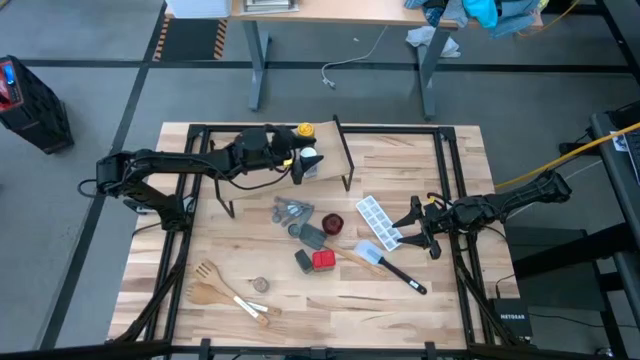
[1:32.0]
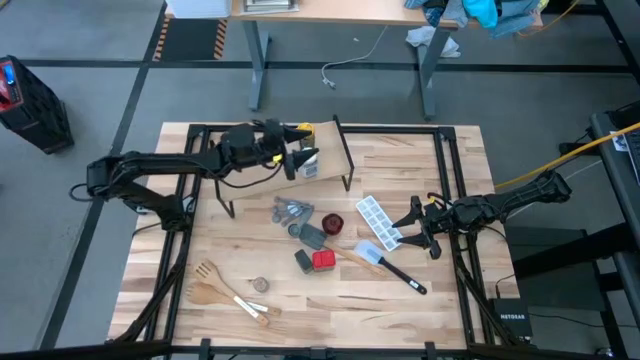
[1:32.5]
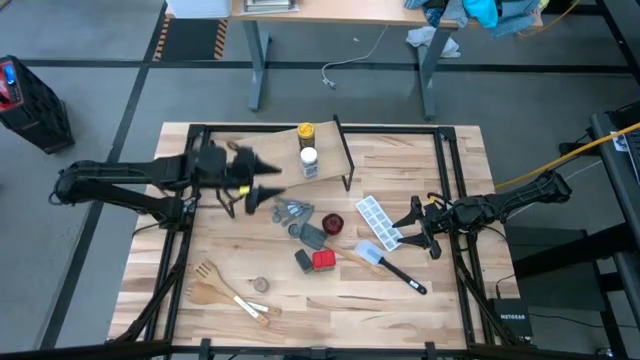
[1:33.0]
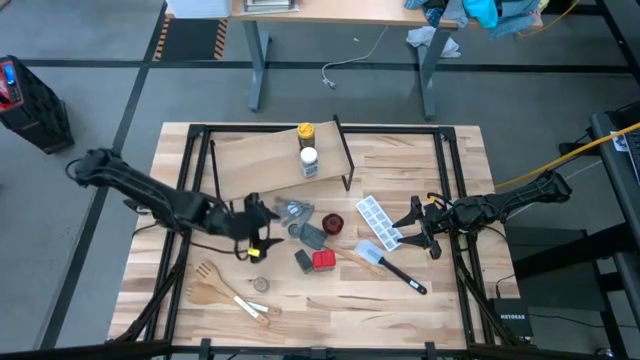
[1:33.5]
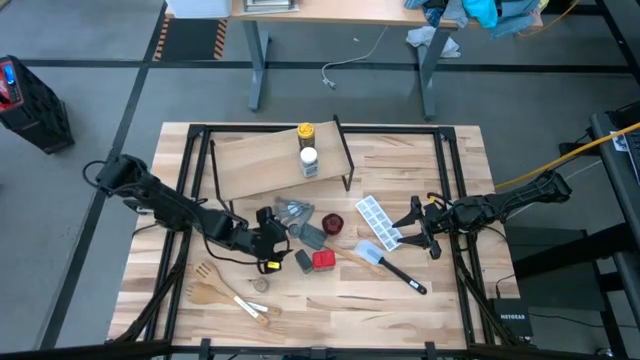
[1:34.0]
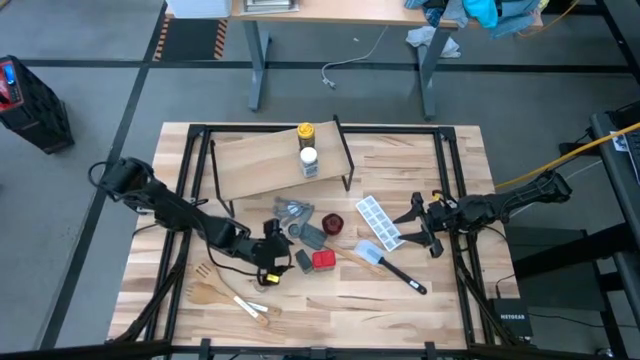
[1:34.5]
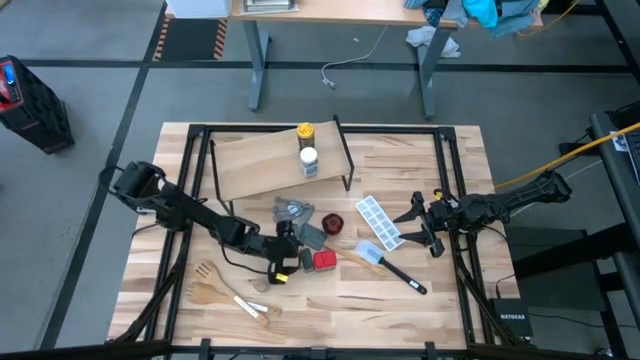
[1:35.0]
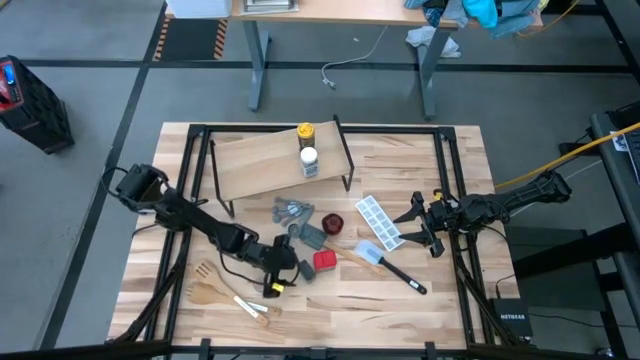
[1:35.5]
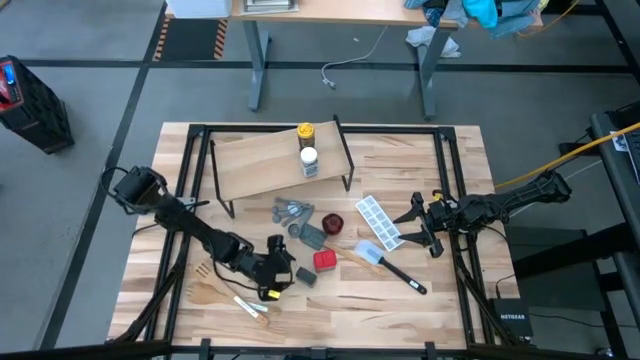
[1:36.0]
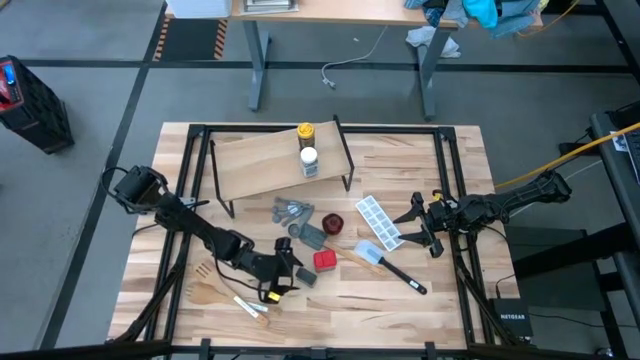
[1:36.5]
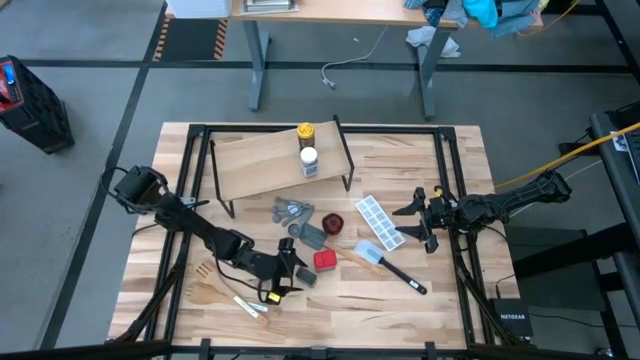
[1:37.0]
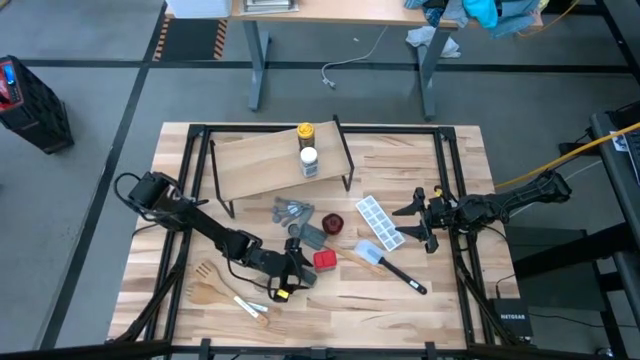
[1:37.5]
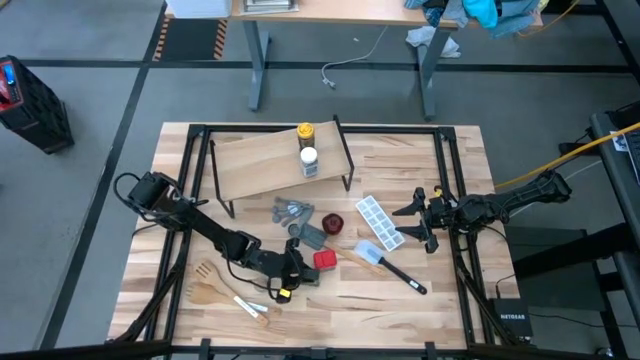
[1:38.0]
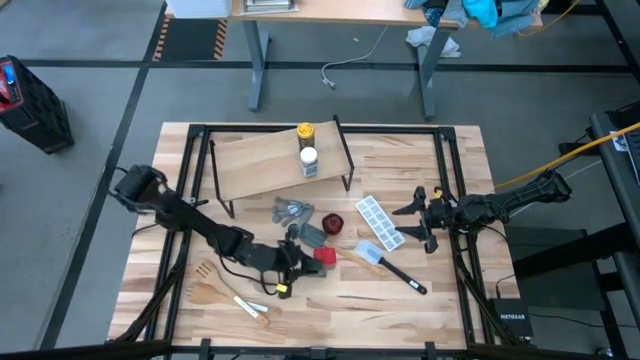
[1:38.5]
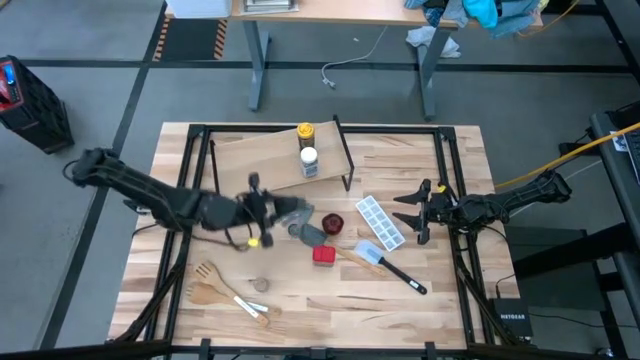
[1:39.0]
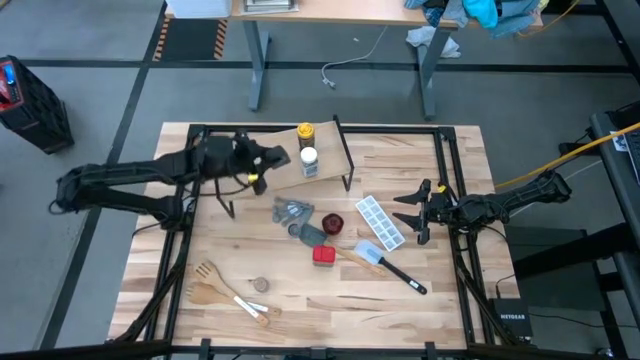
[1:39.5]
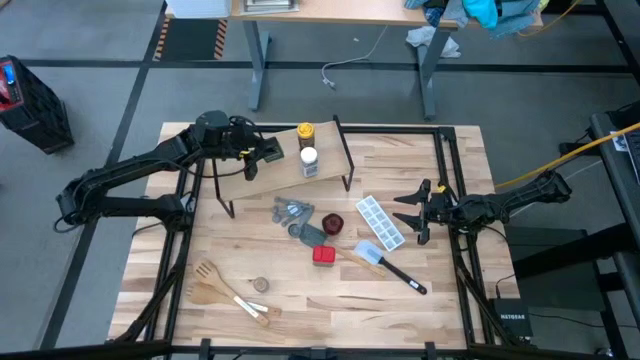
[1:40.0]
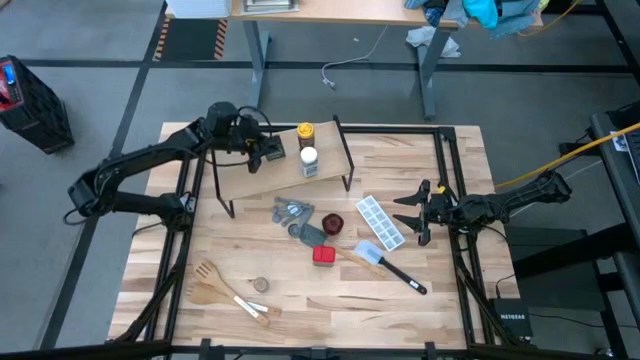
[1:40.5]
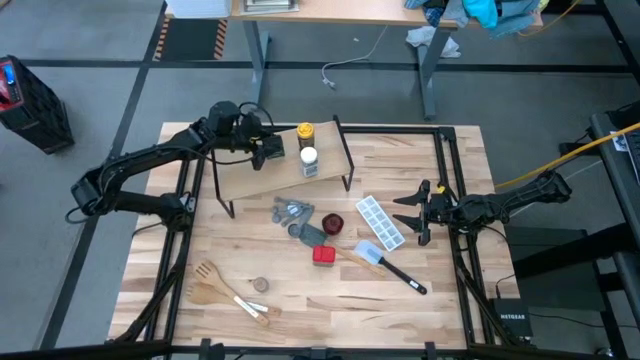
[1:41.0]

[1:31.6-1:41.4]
Task: Shelf spices
Put the green seasoning can on the shelf

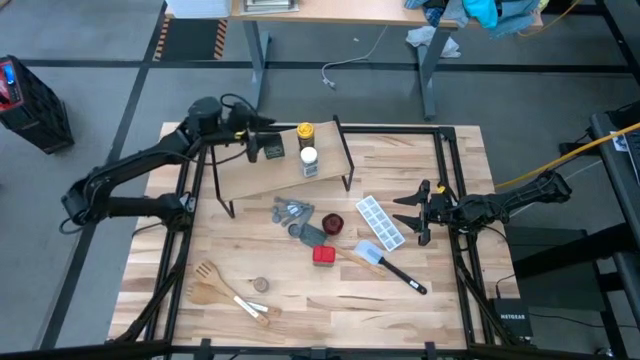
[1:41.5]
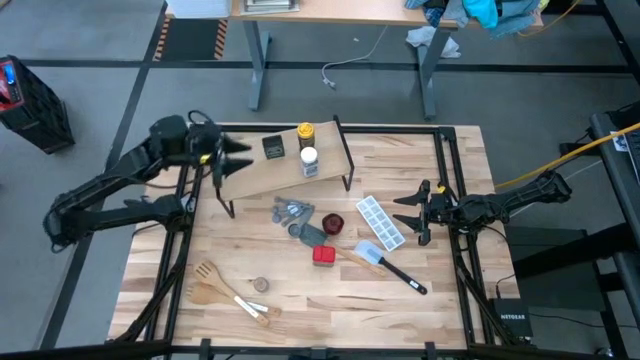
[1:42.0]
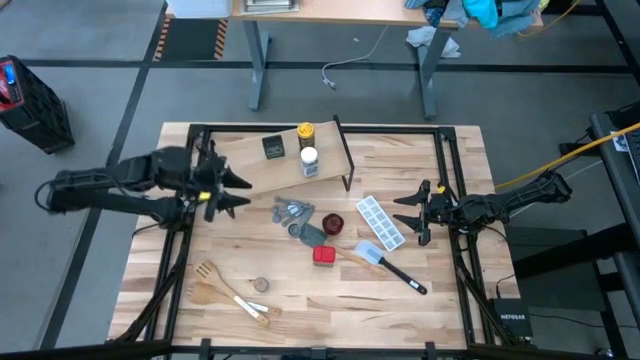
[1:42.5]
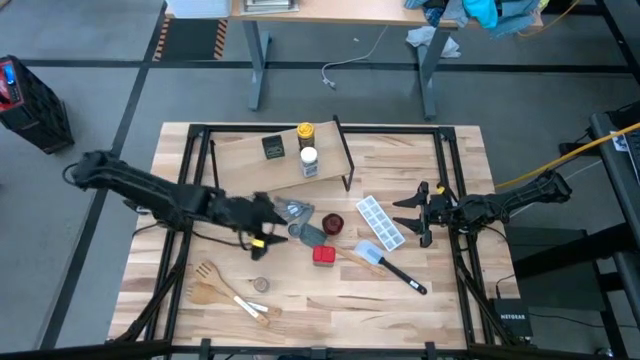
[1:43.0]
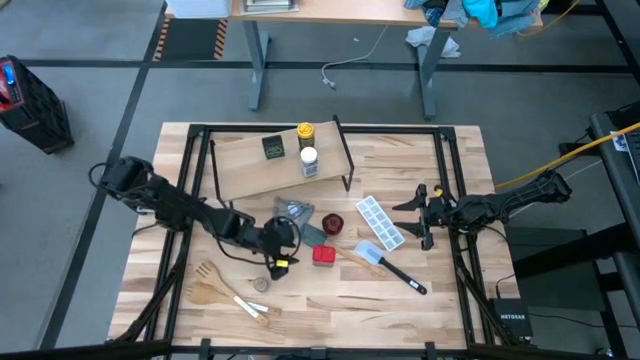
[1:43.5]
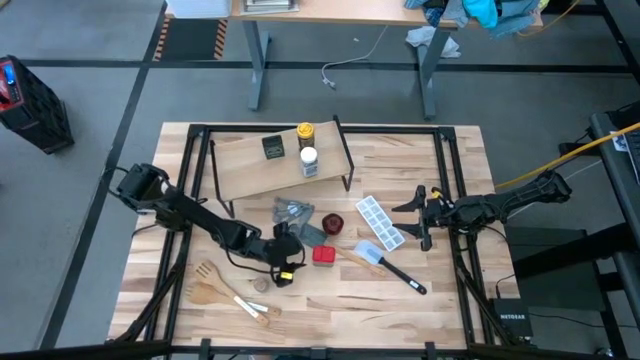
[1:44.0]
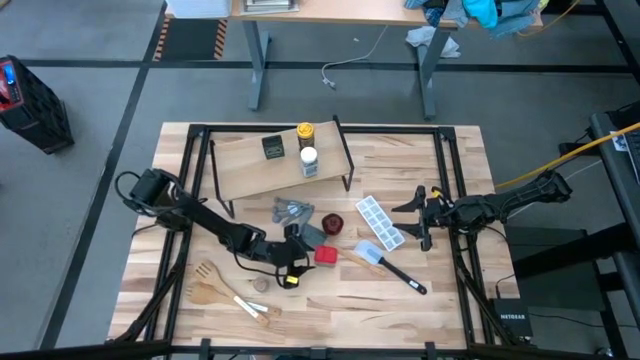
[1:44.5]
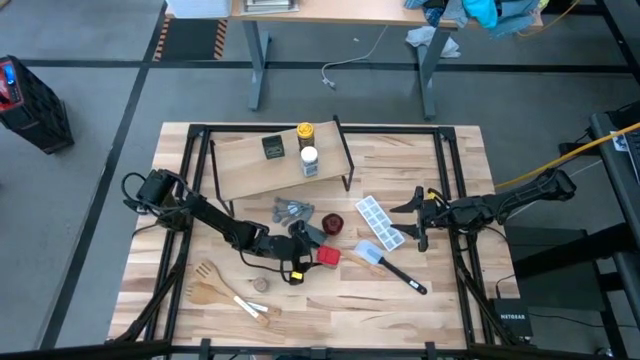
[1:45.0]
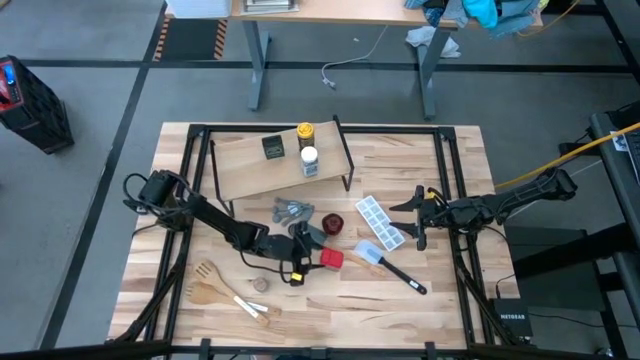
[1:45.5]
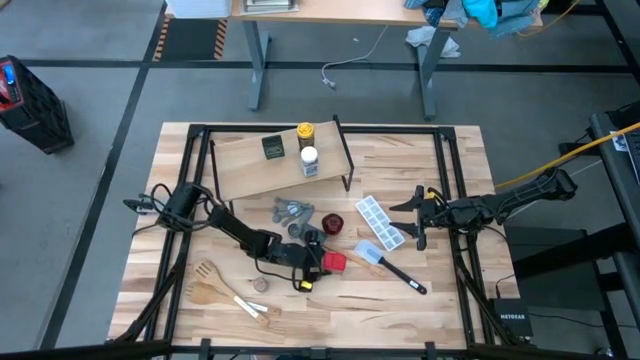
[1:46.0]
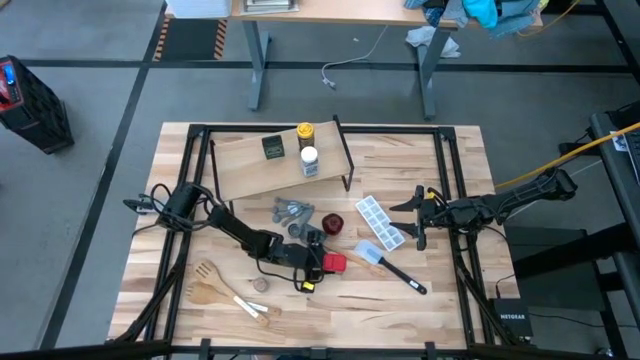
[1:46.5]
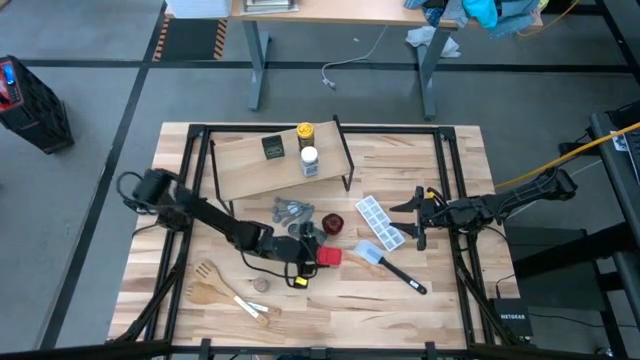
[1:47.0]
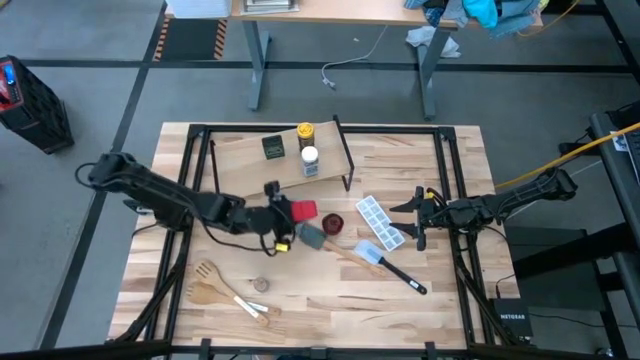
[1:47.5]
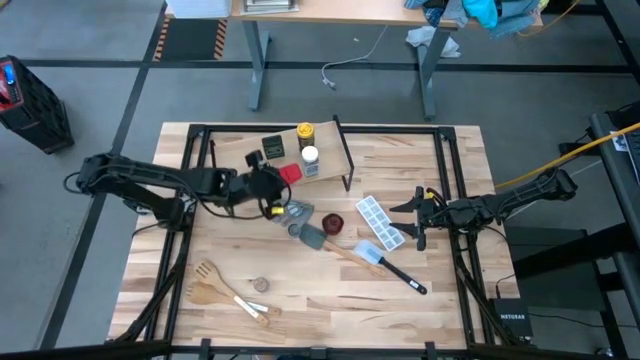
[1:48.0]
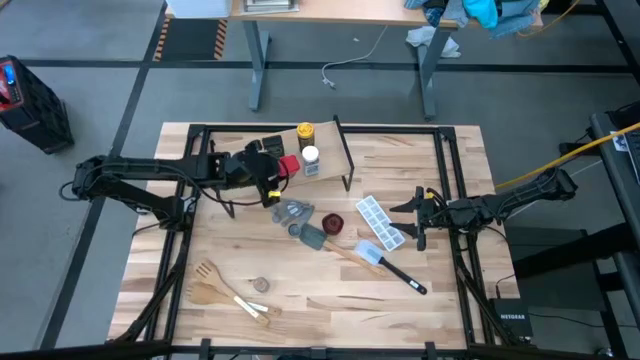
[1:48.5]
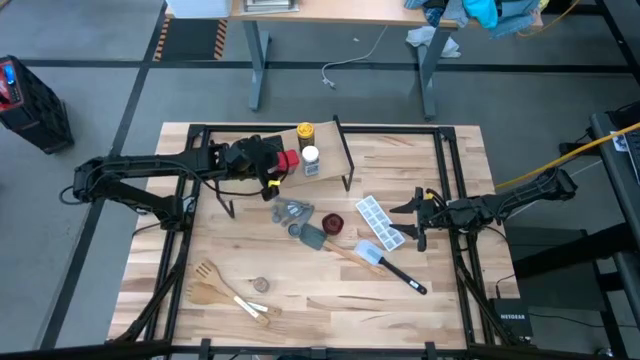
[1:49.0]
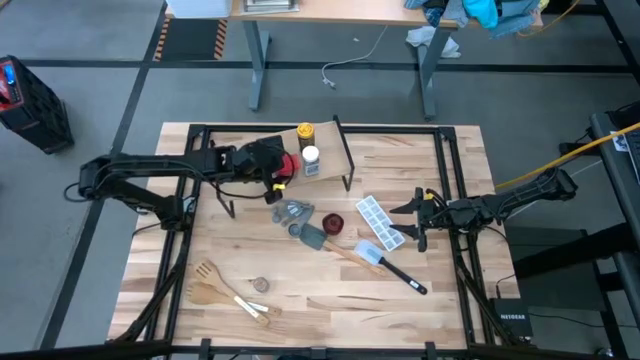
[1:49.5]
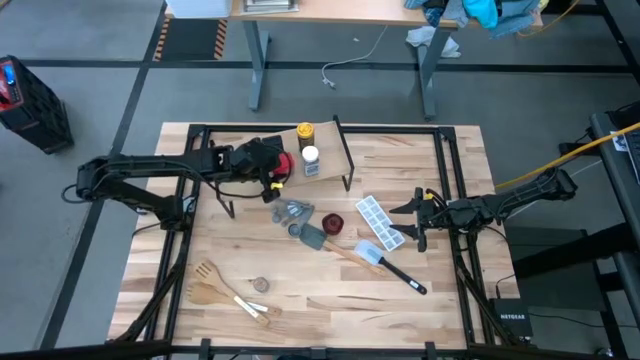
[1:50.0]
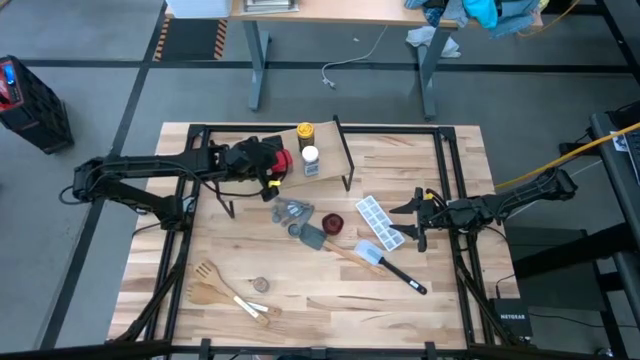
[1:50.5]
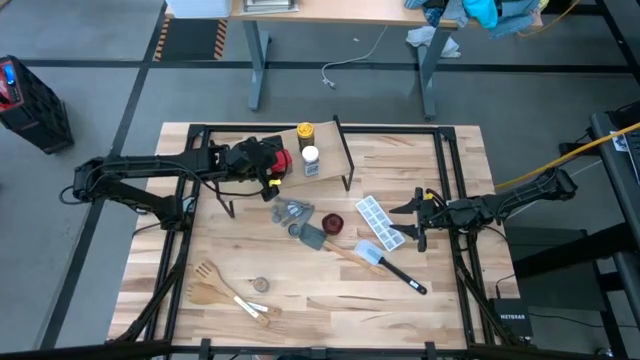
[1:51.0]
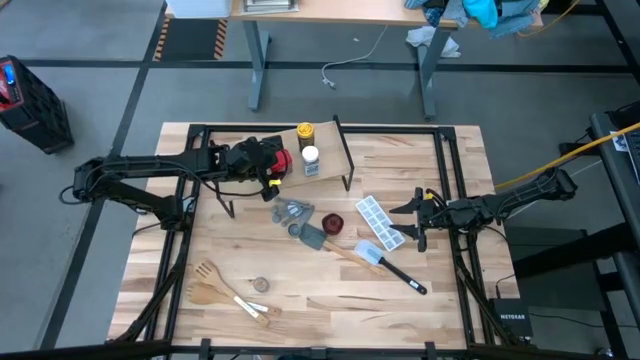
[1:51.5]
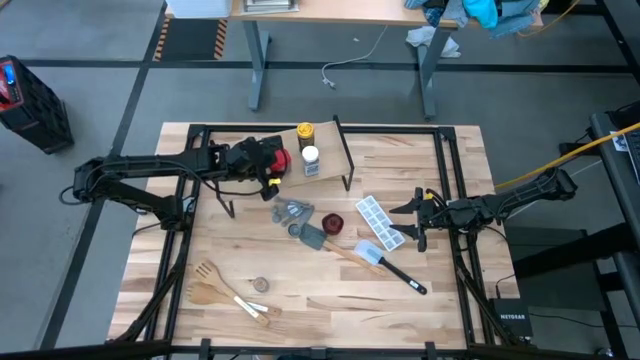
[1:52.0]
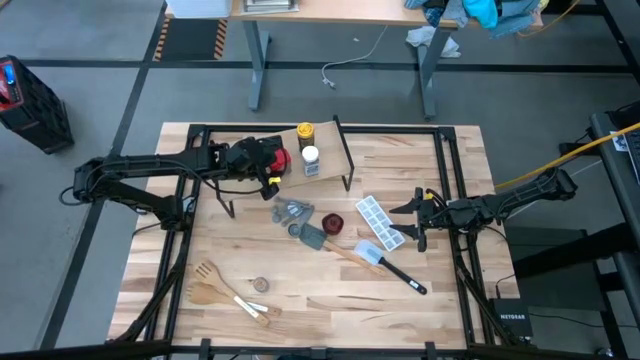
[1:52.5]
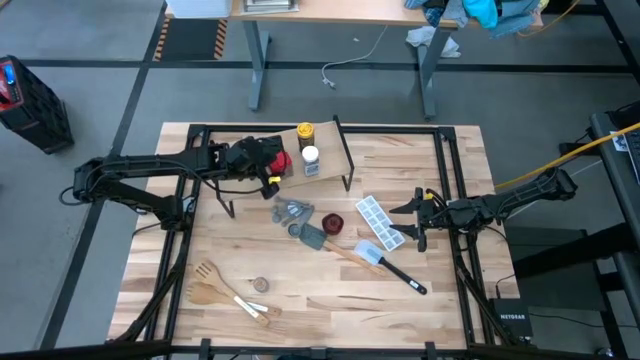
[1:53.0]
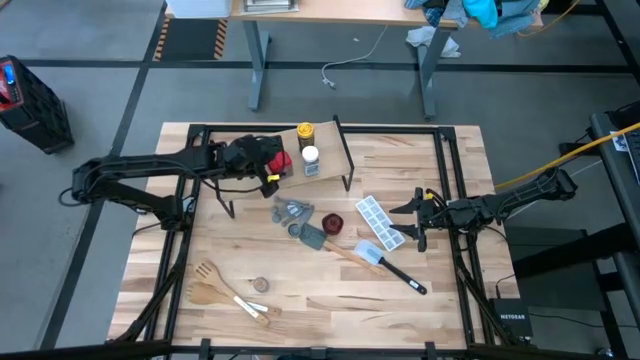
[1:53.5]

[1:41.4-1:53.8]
Put the red seasoning can on the shelf
